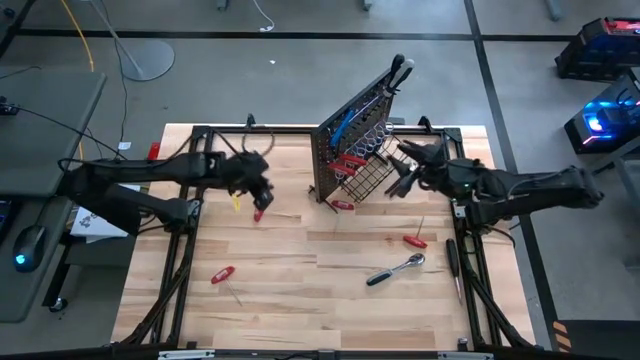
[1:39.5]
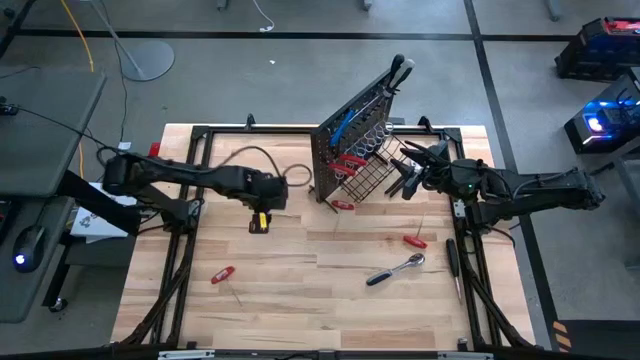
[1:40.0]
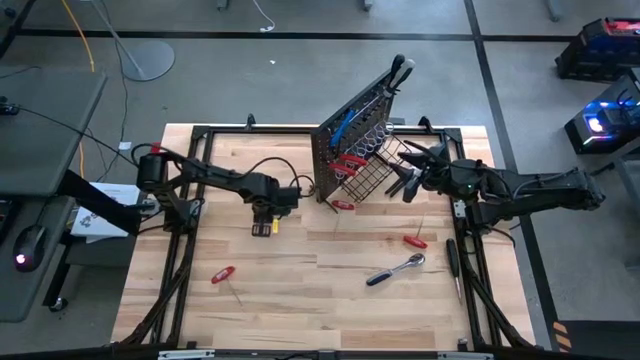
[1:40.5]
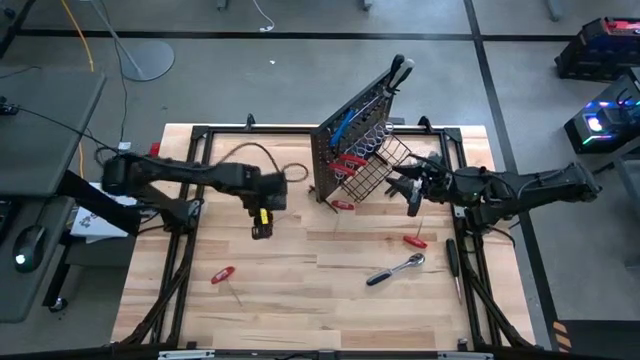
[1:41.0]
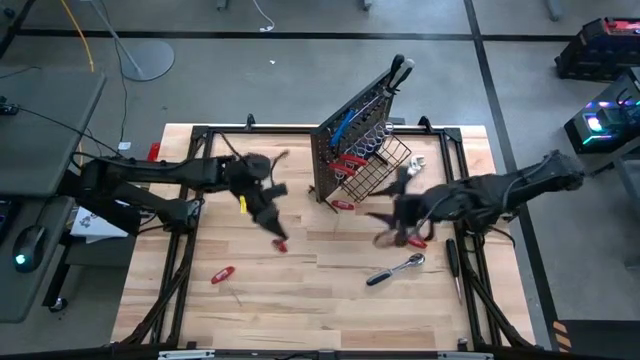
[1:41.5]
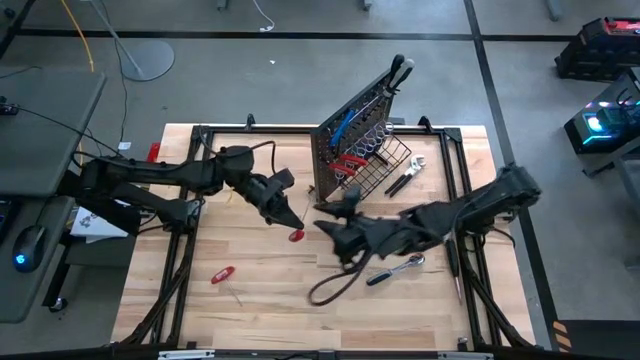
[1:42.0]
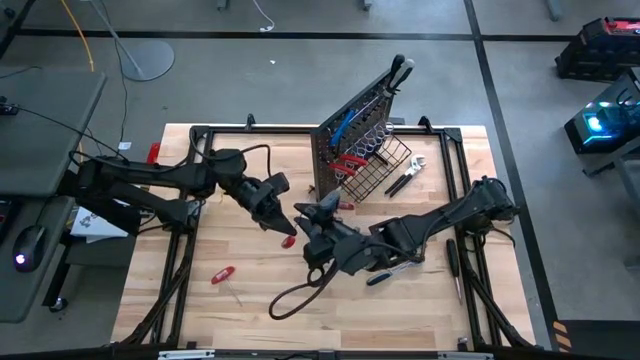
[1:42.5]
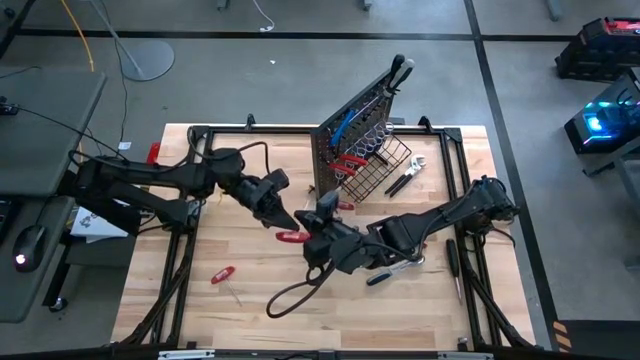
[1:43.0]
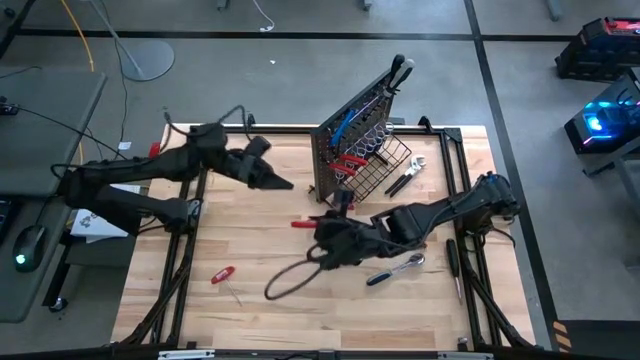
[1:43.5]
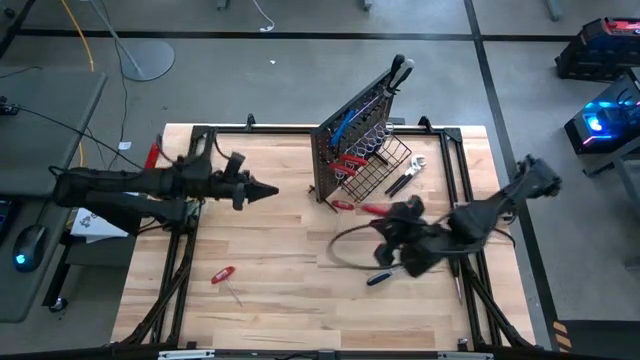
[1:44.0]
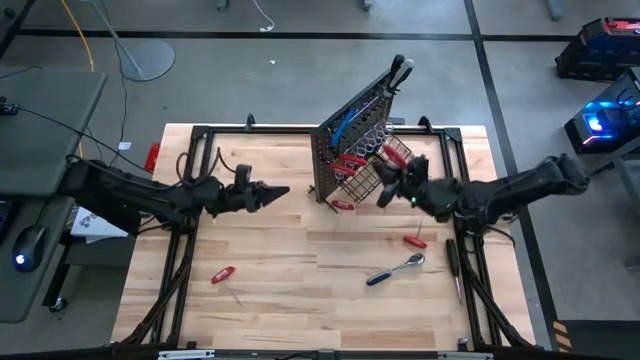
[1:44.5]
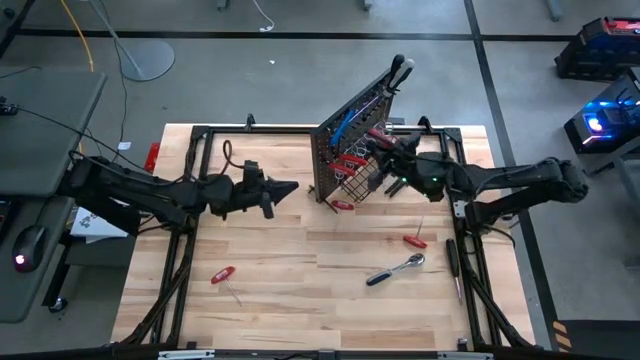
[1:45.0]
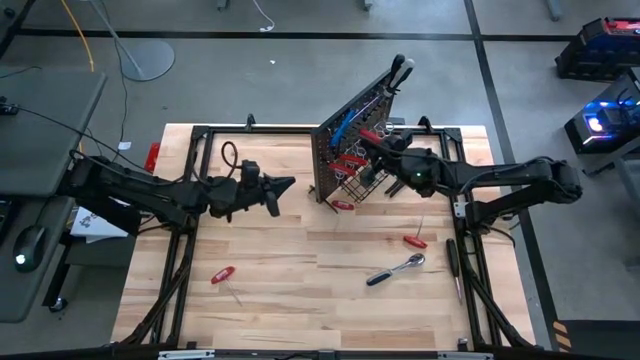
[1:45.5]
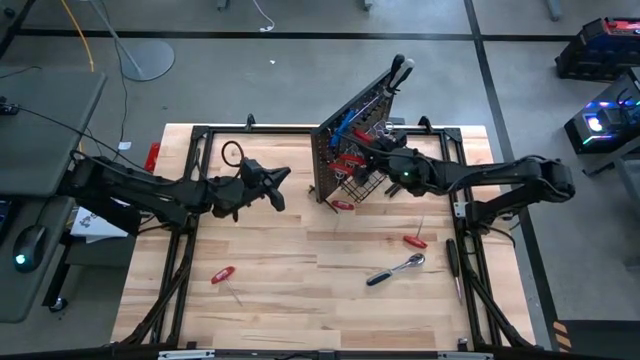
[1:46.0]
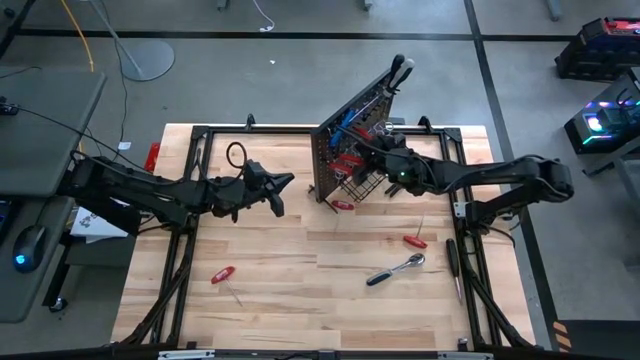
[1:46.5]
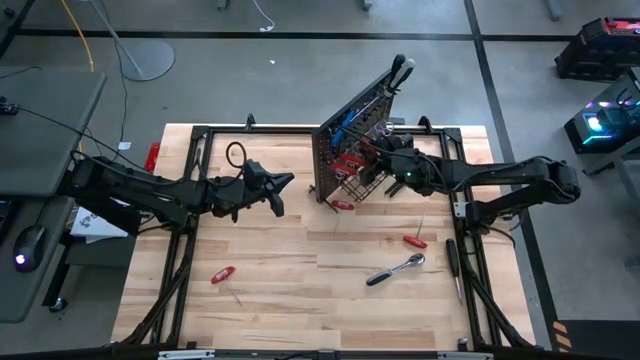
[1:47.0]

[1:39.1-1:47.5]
Task: Hang tools onto peg board
Hang the red allen wrench on the peg board

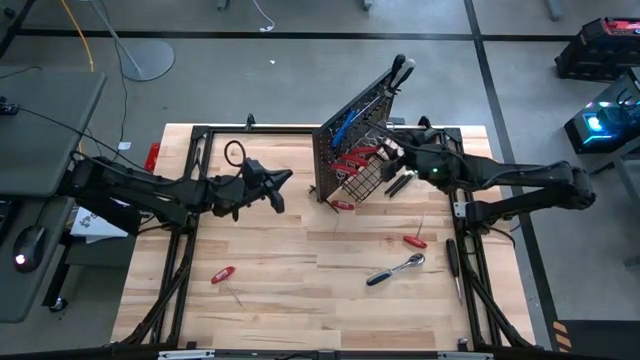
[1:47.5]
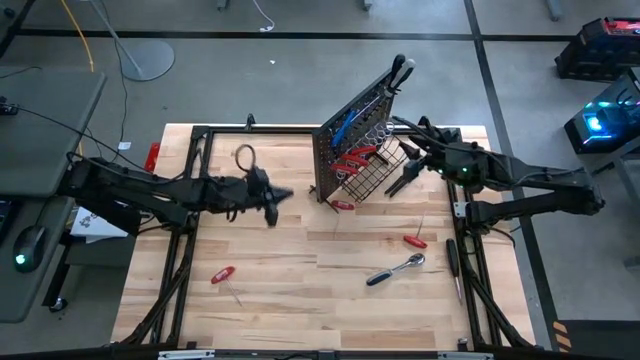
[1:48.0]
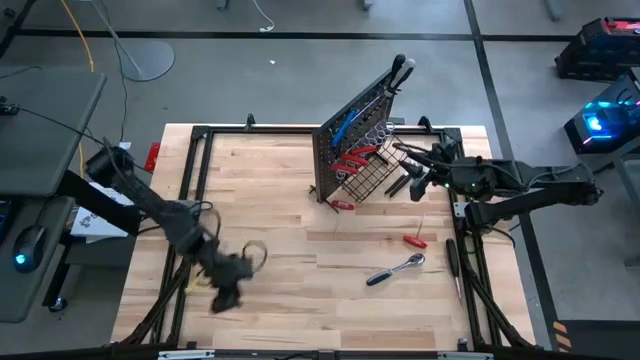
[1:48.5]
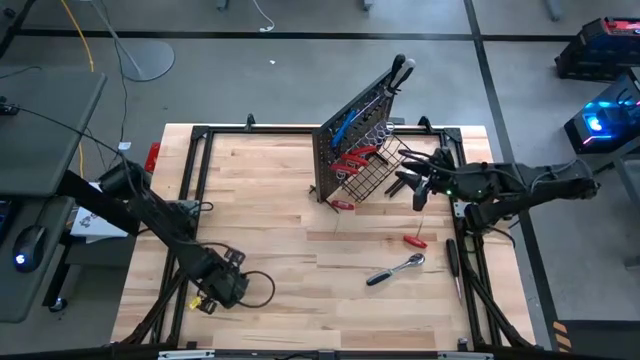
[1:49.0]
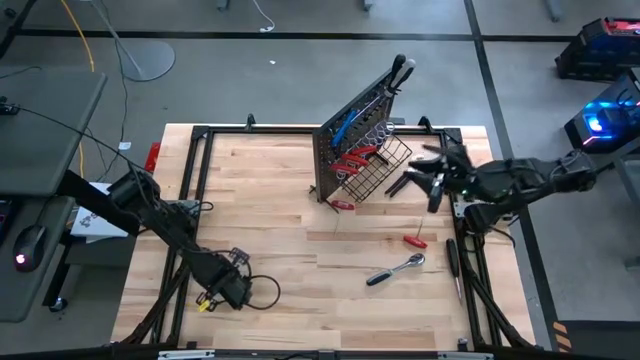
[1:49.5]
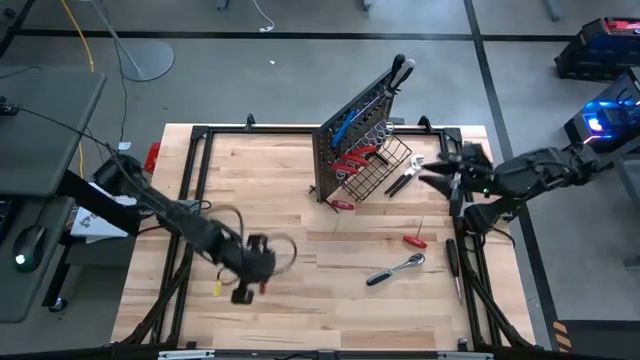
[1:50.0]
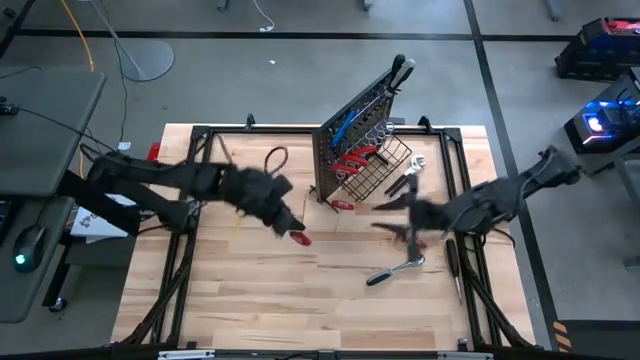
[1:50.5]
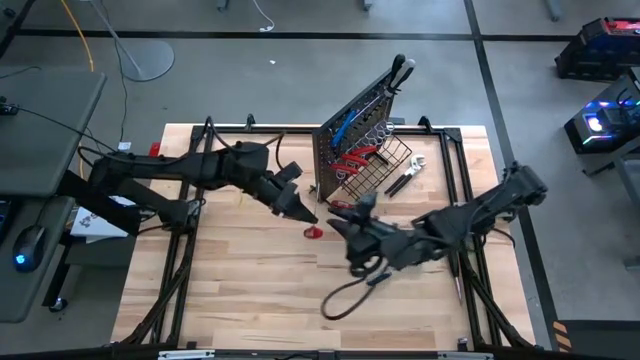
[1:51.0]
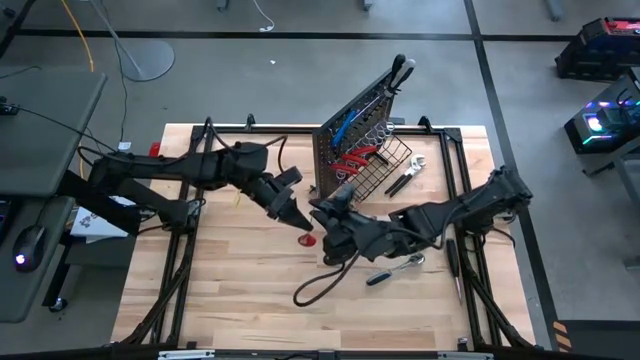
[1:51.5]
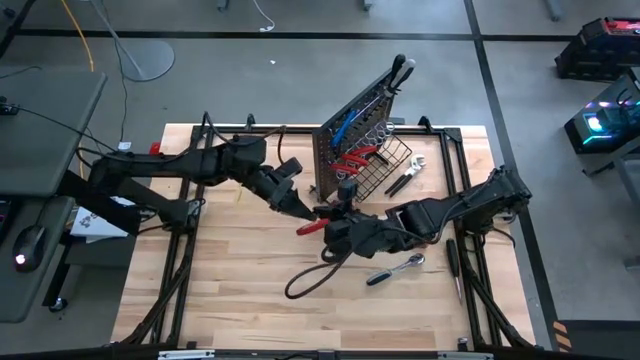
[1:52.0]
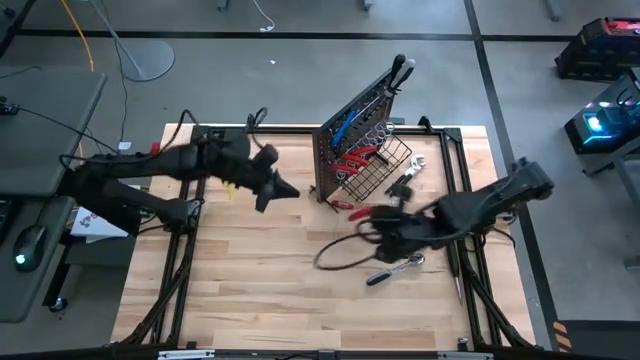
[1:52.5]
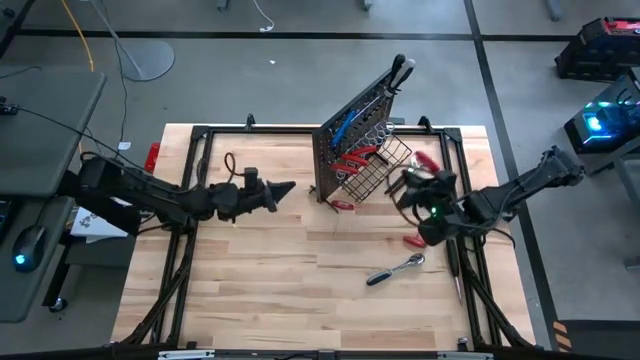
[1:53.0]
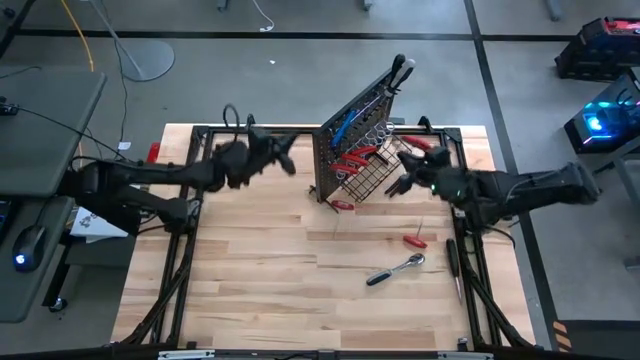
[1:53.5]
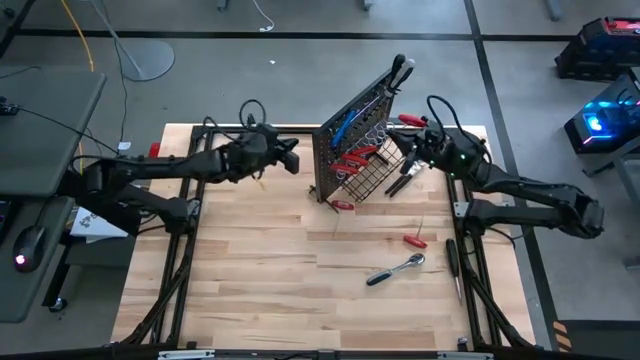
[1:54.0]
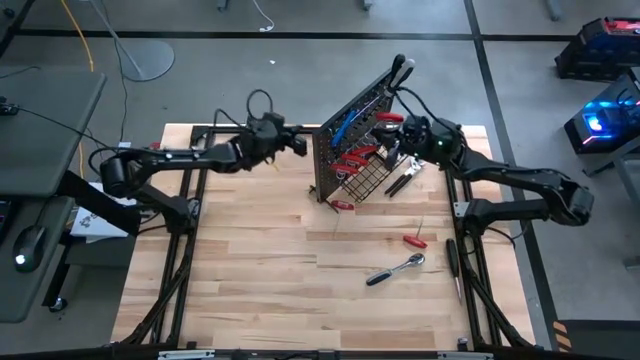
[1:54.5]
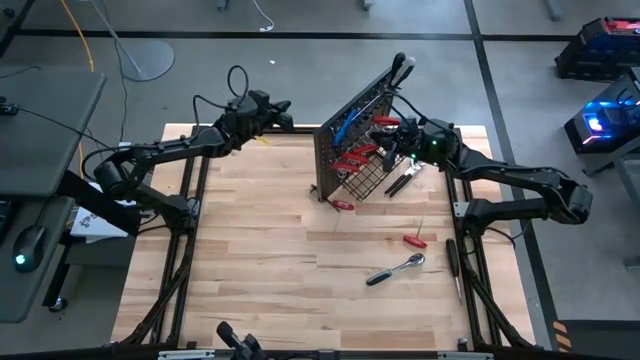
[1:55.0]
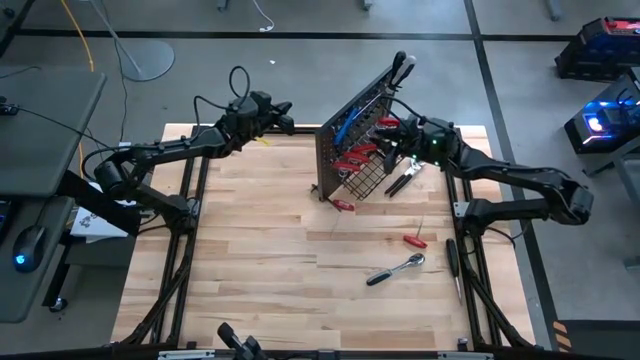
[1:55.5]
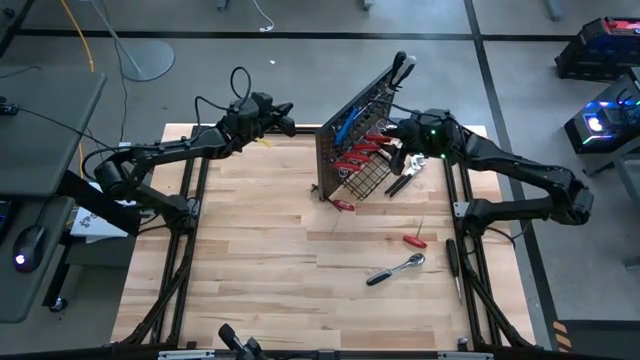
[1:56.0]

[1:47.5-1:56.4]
Hang the red allen wrench on the peg board

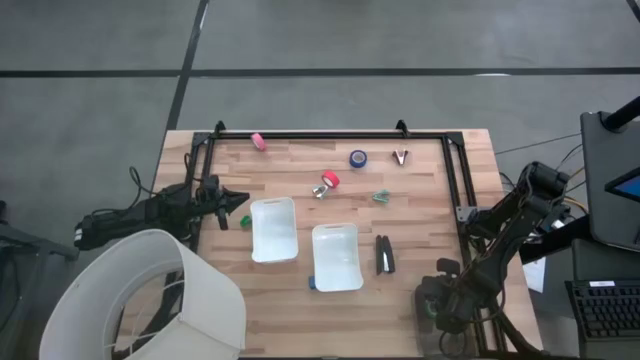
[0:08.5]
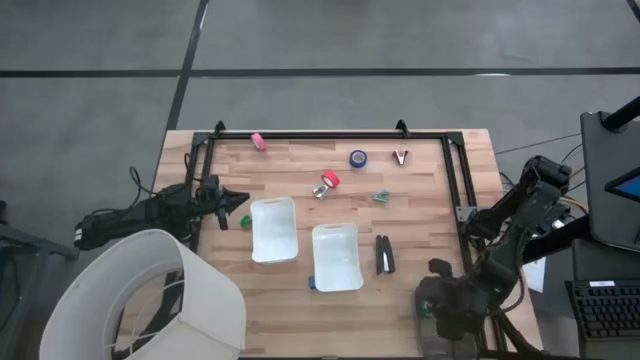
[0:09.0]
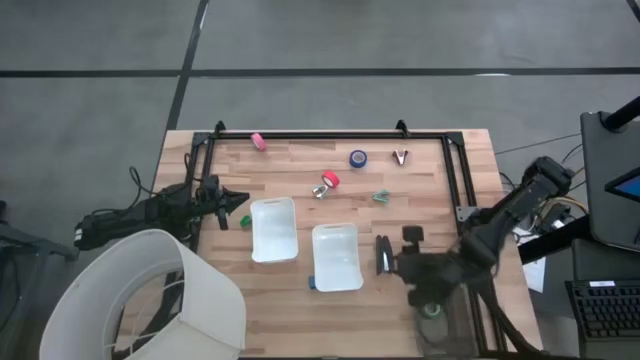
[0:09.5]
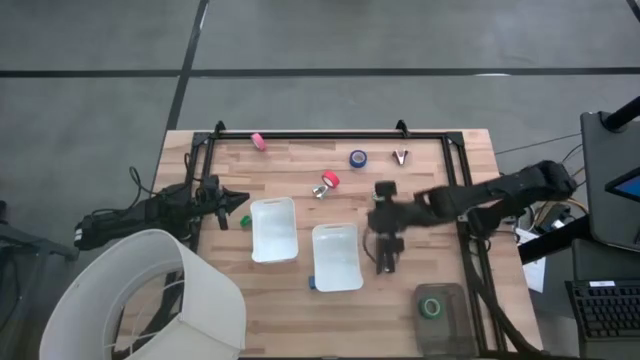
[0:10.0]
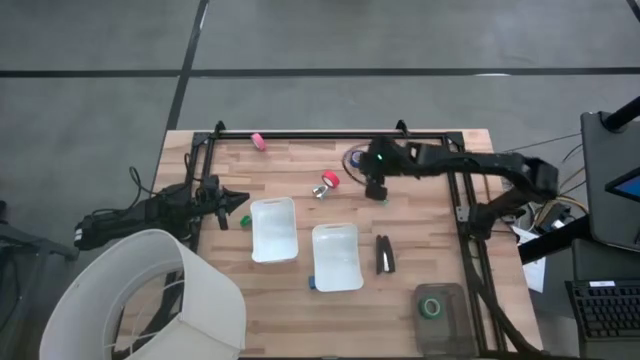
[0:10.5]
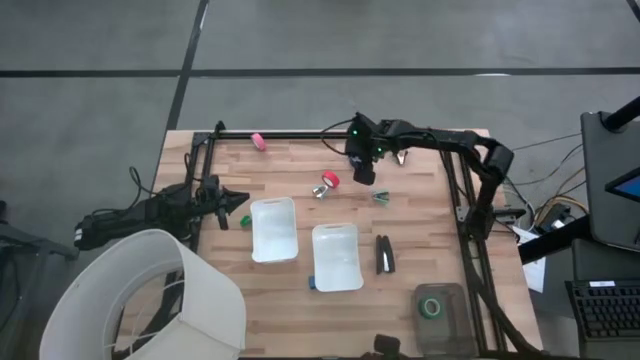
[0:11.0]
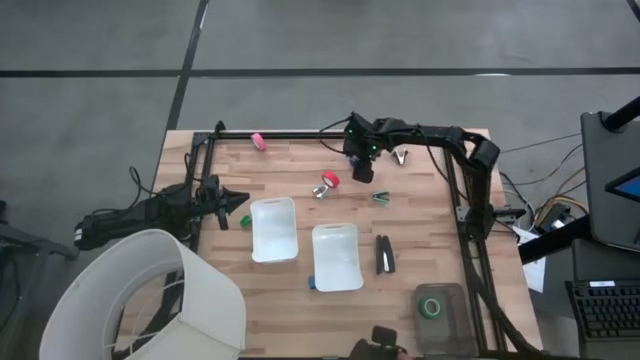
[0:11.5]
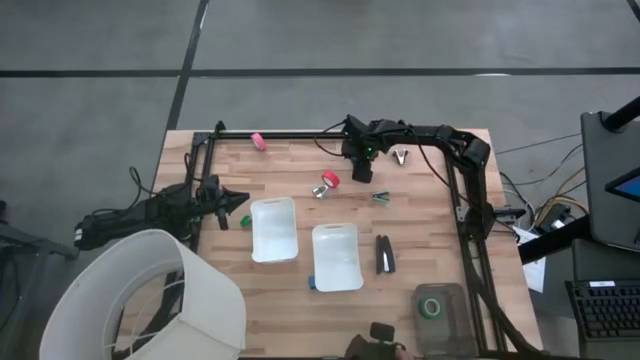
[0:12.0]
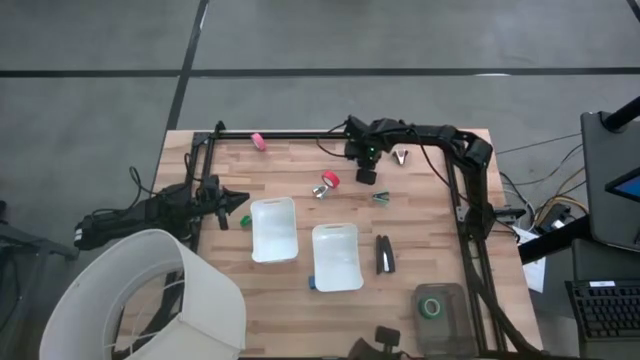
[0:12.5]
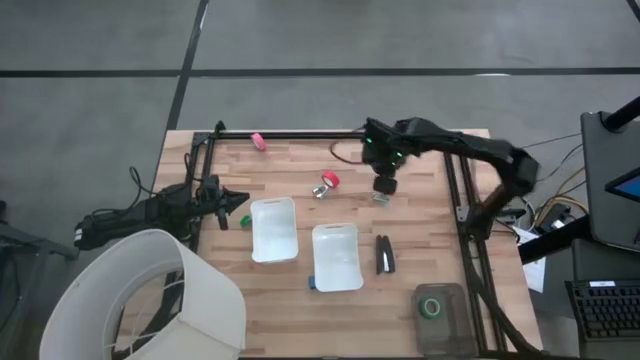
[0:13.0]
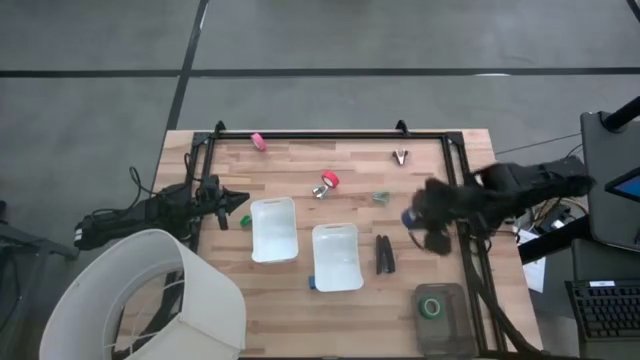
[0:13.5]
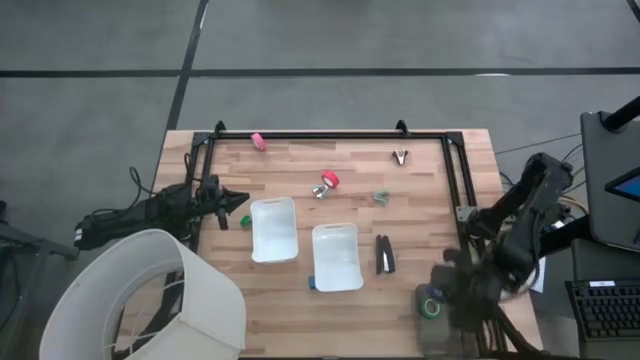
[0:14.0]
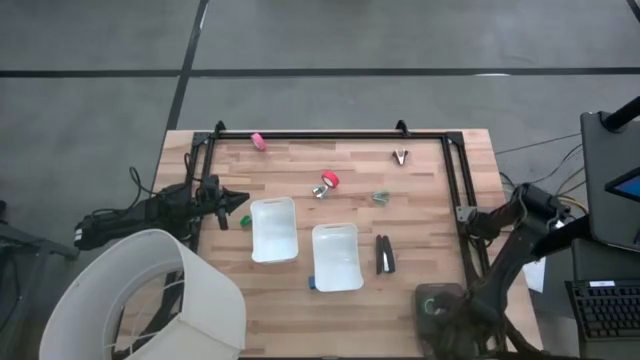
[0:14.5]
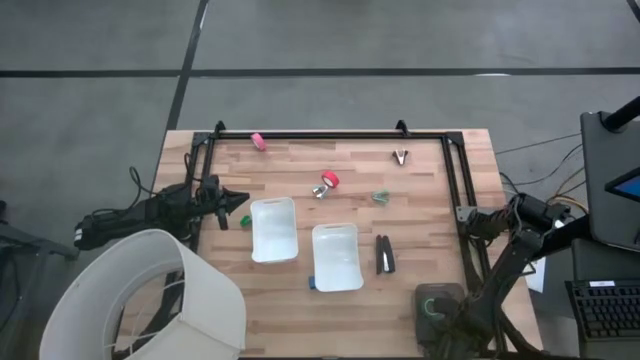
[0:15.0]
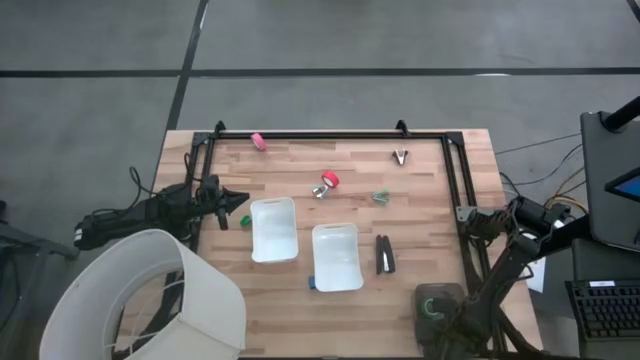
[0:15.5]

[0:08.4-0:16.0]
Task: Pick and place Stapler, Stapler remover, tape
Put the blue tape into the black bin
